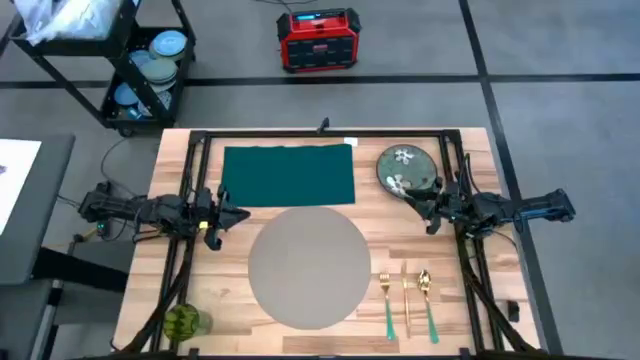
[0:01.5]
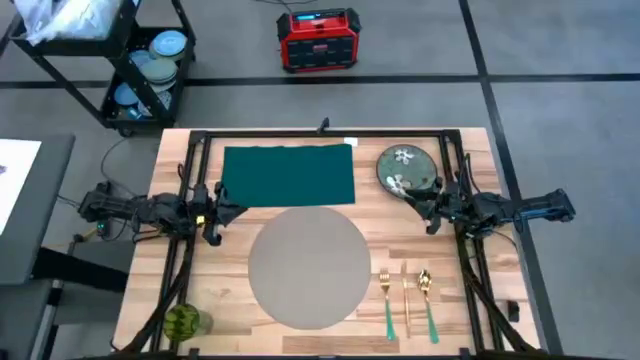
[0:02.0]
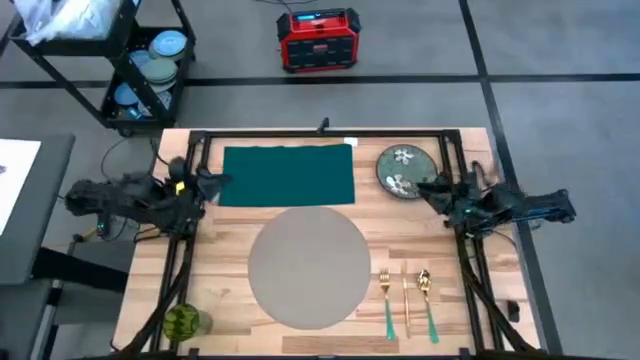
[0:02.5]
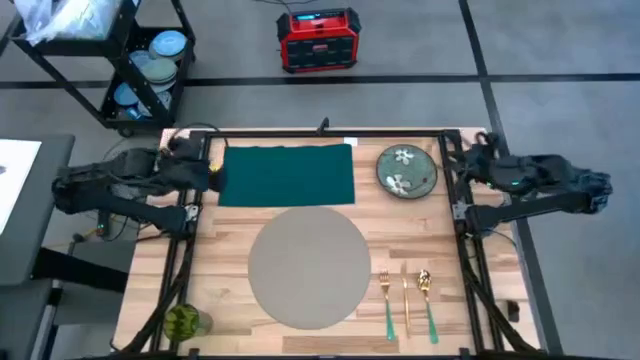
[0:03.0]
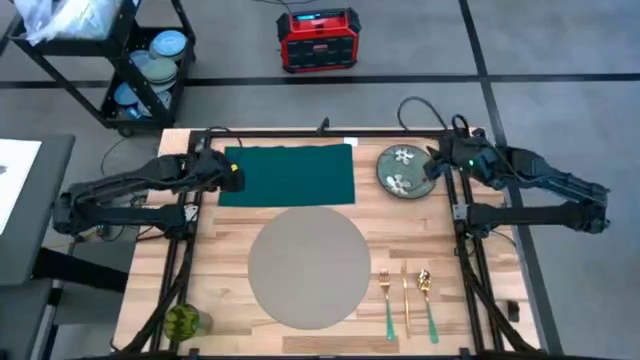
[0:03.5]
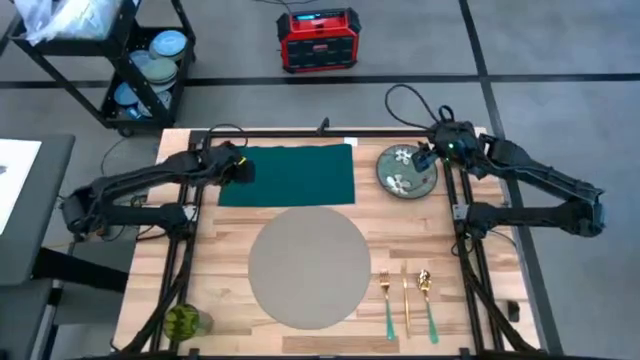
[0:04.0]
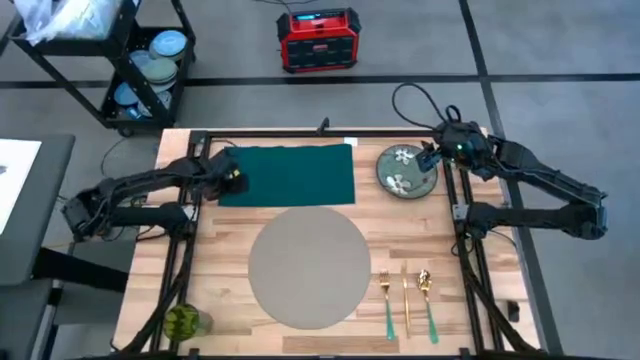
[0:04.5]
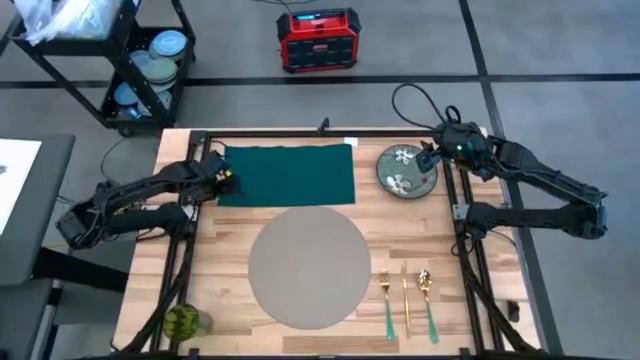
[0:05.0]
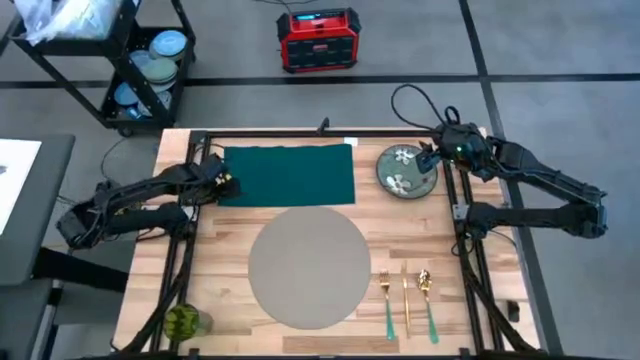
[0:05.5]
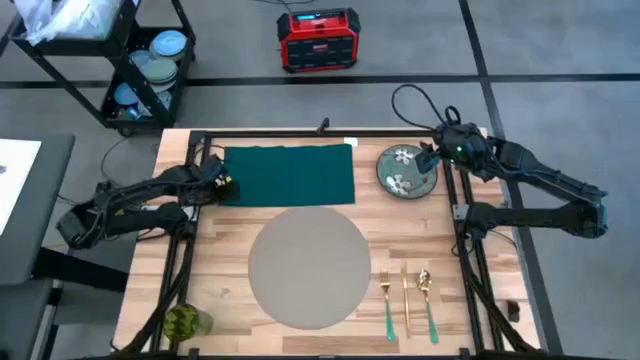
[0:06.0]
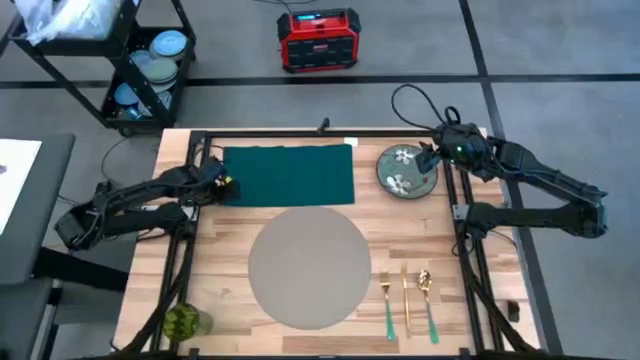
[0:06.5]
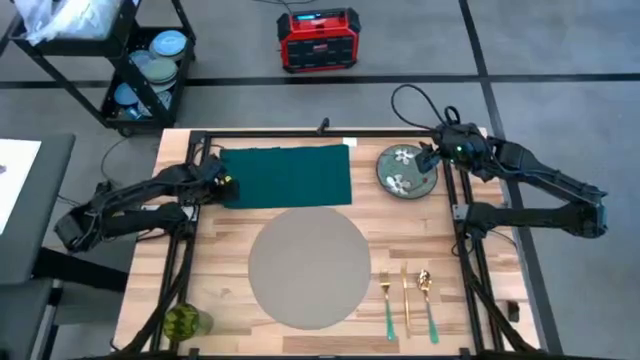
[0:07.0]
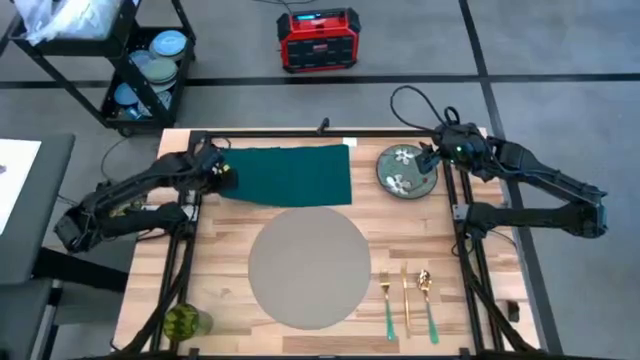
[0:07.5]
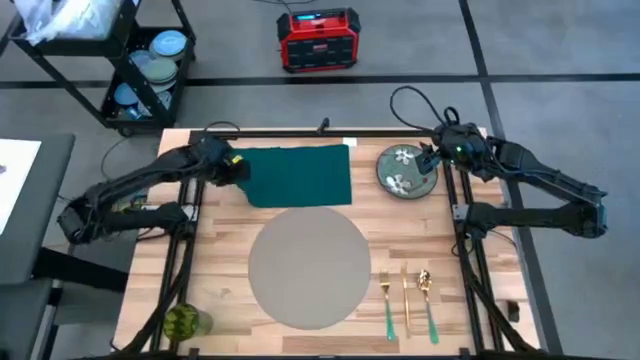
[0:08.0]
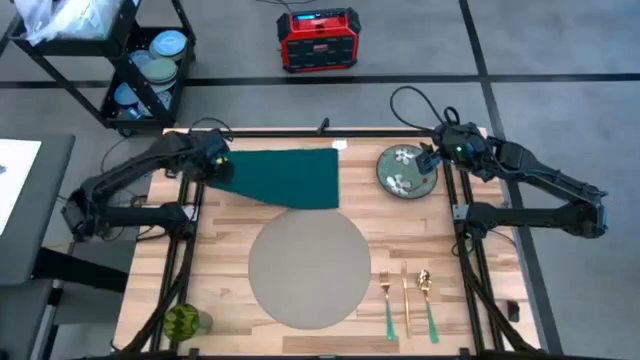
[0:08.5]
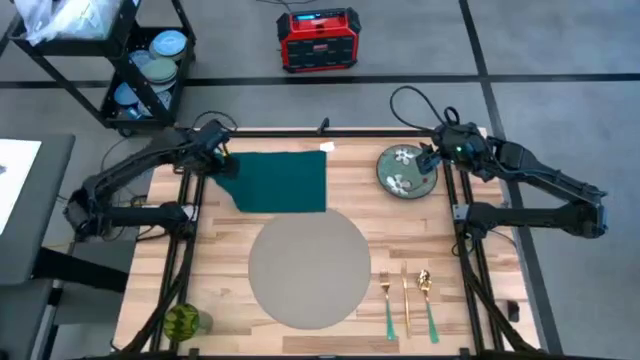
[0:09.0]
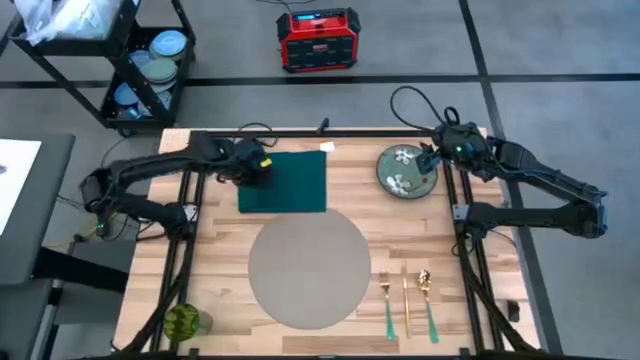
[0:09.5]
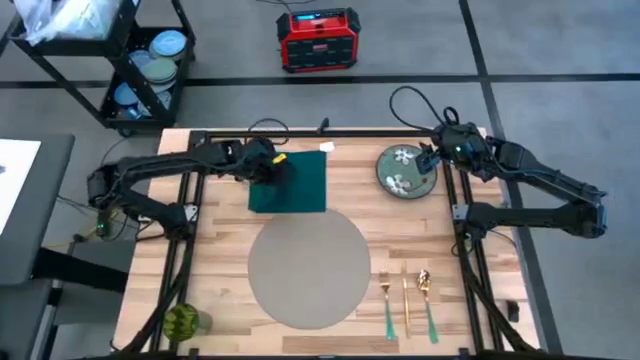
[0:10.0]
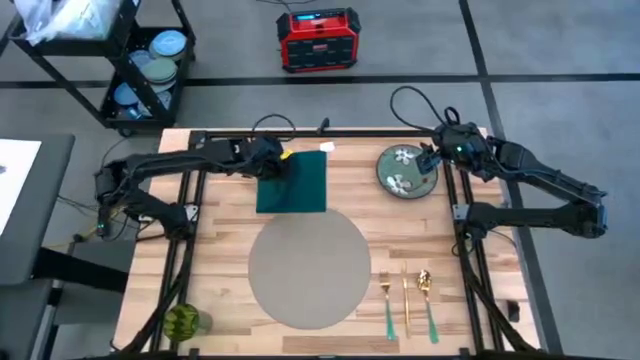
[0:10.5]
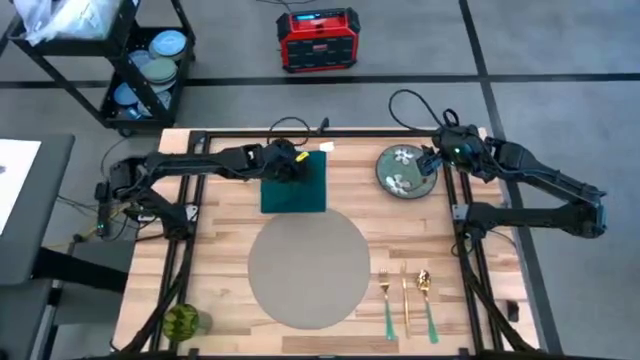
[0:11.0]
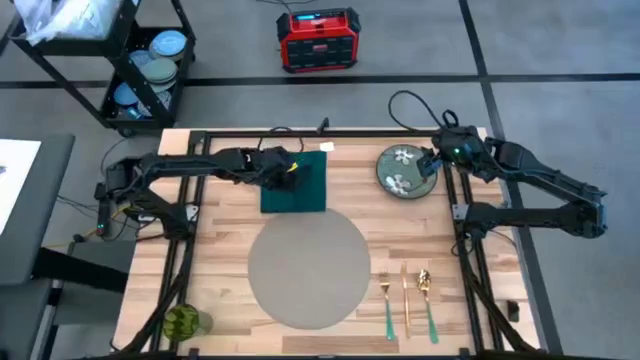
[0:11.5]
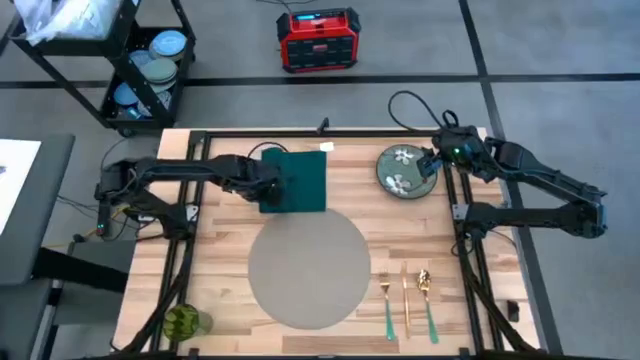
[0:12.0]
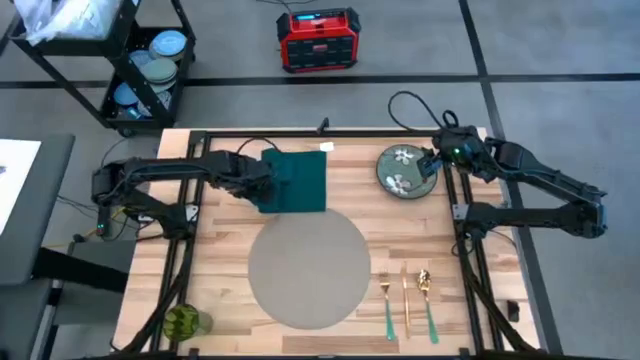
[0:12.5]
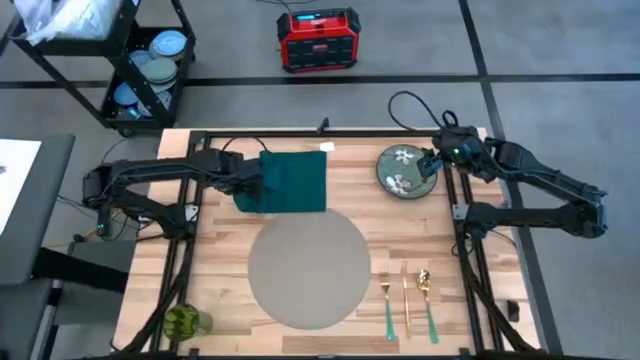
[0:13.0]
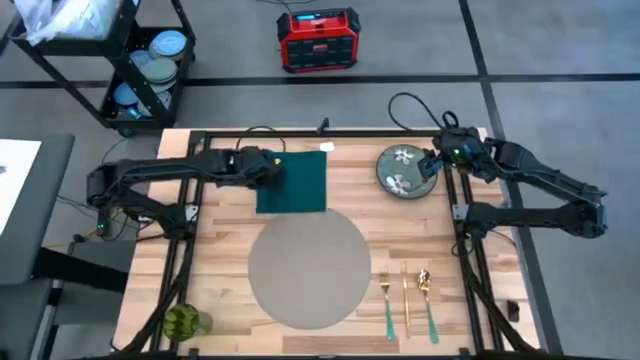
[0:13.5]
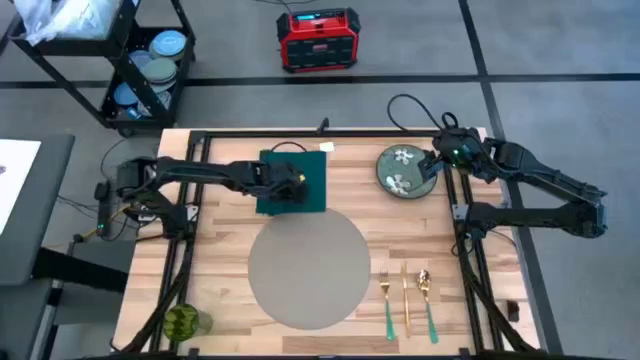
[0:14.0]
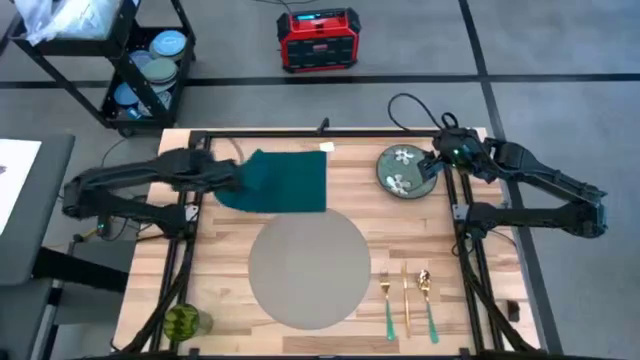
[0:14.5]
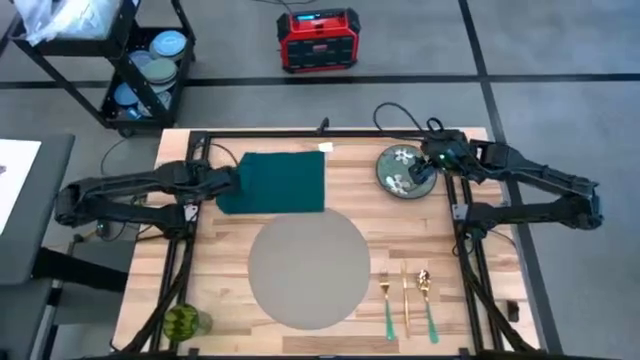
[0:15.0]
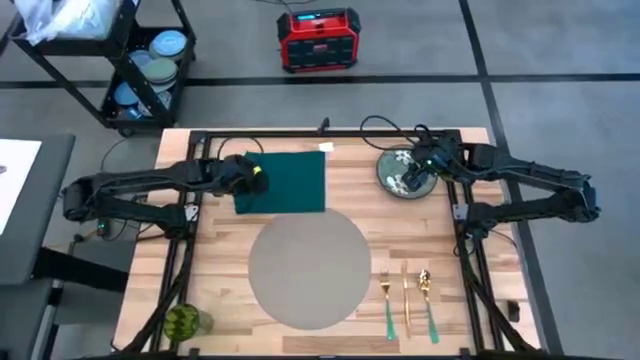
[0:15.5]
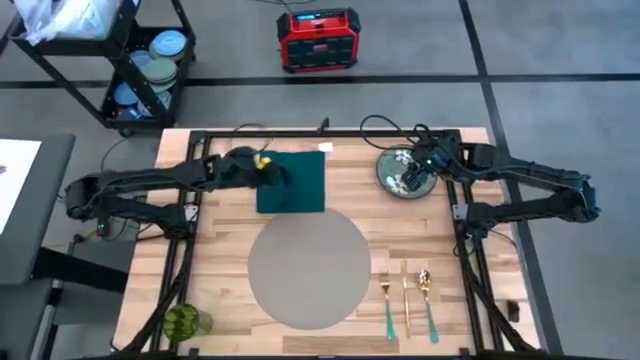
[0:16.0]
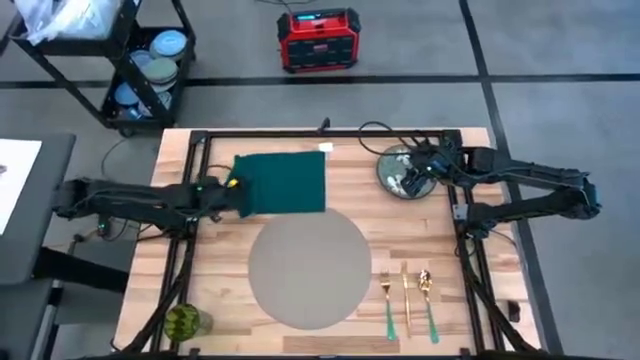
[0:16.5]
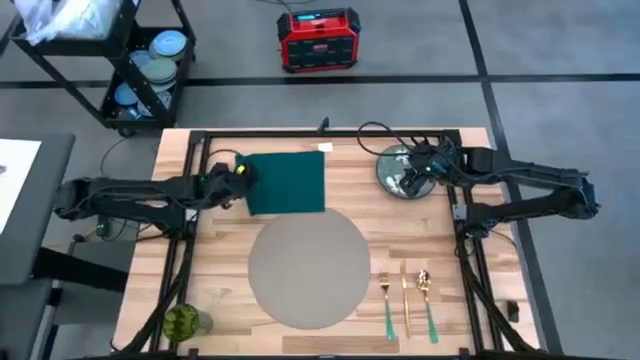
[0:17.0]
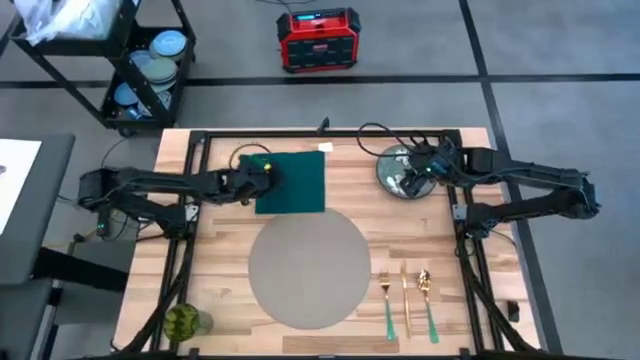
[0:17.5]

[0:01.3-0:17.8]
Task: Set table place
Fold the blue table napkin
